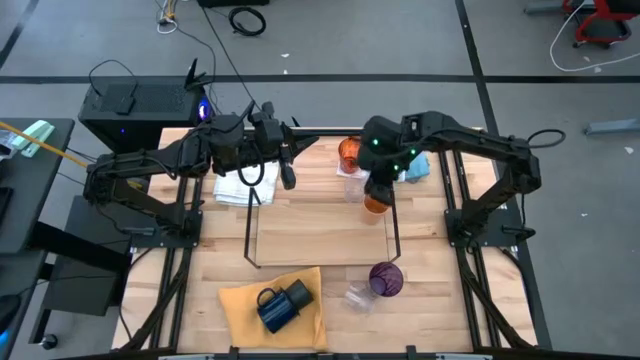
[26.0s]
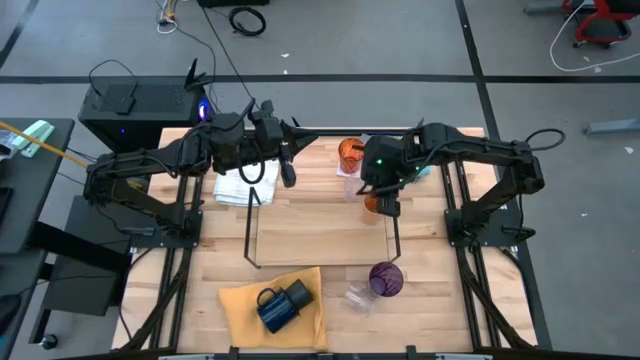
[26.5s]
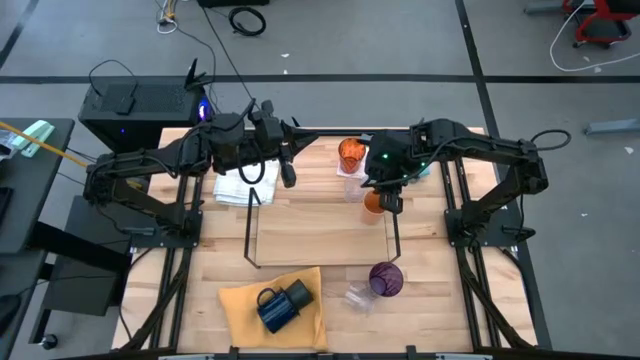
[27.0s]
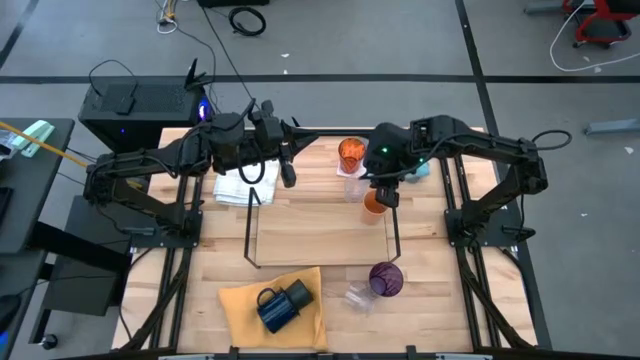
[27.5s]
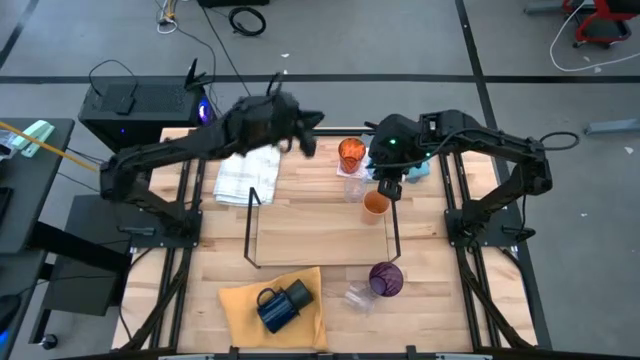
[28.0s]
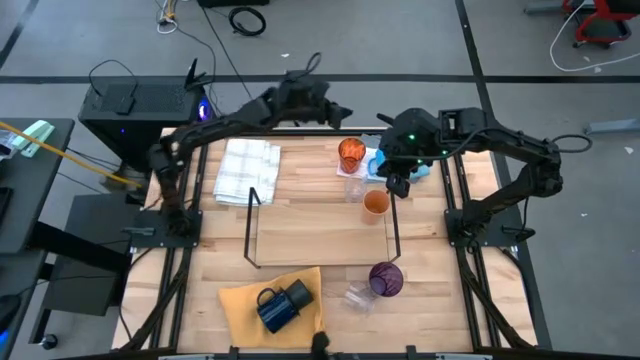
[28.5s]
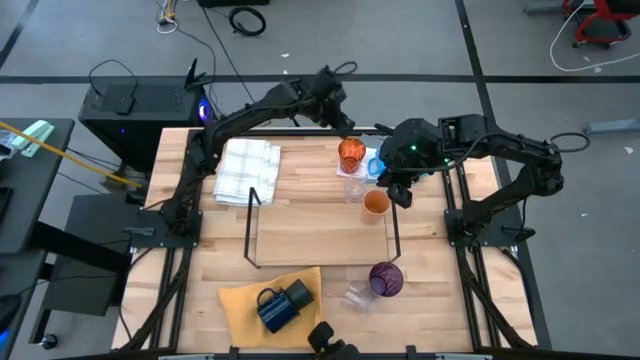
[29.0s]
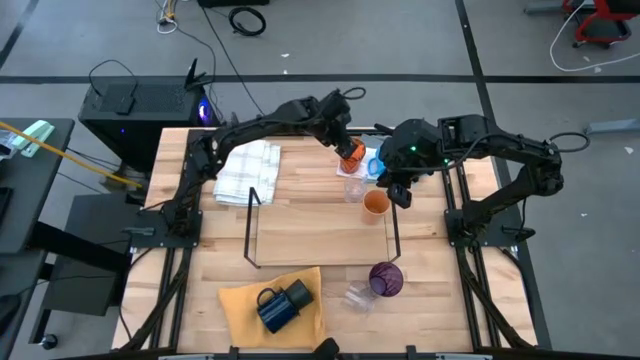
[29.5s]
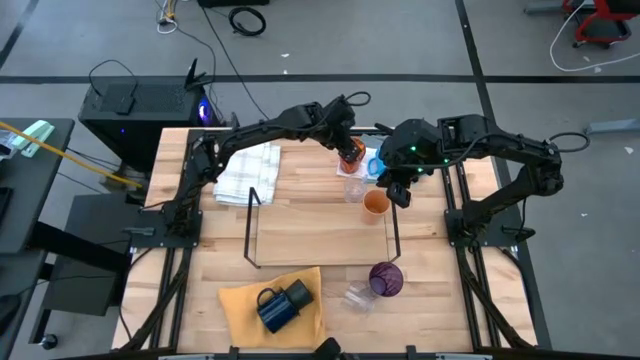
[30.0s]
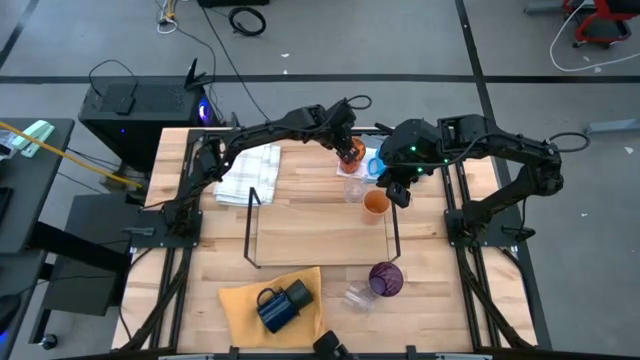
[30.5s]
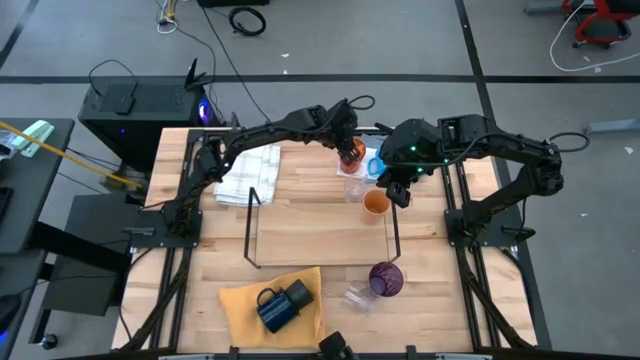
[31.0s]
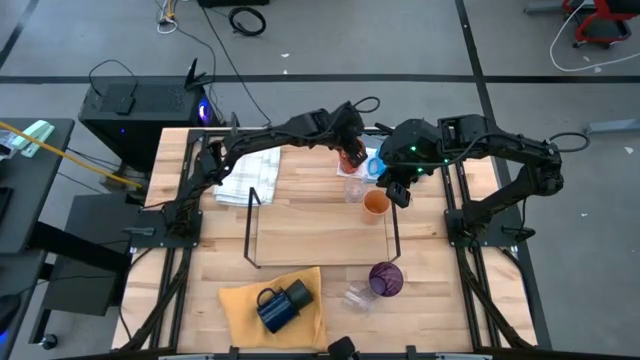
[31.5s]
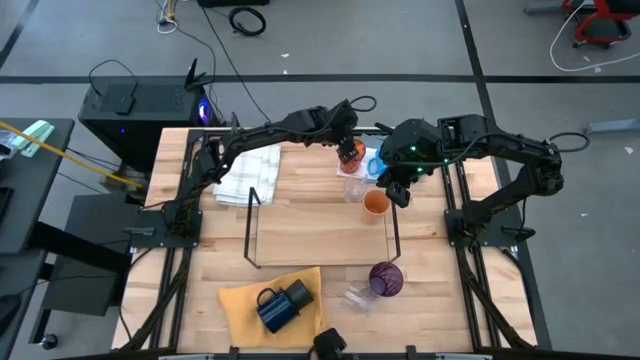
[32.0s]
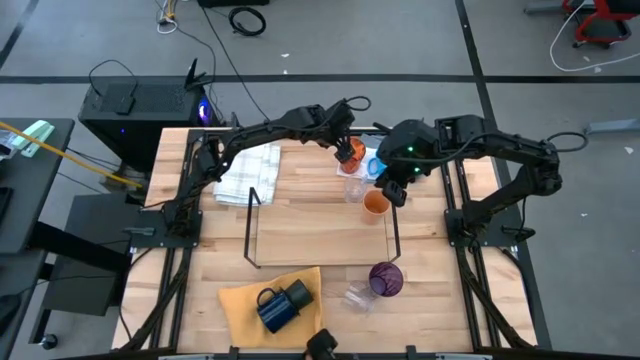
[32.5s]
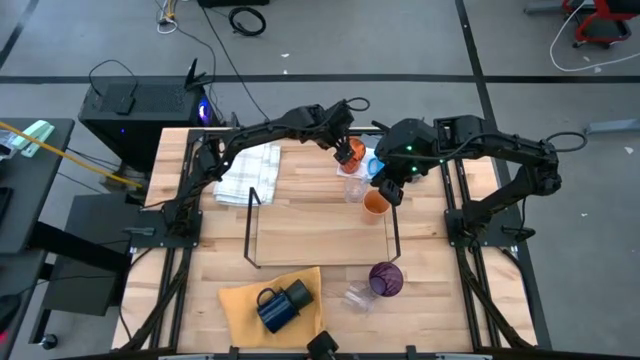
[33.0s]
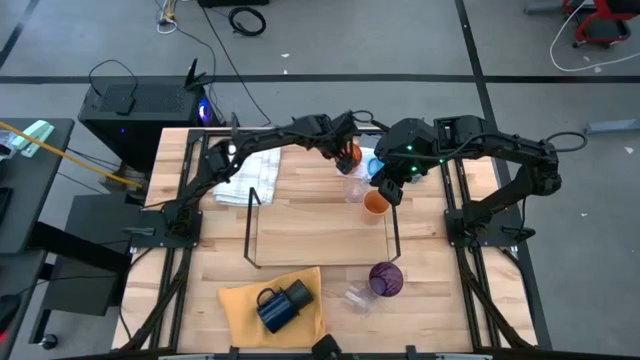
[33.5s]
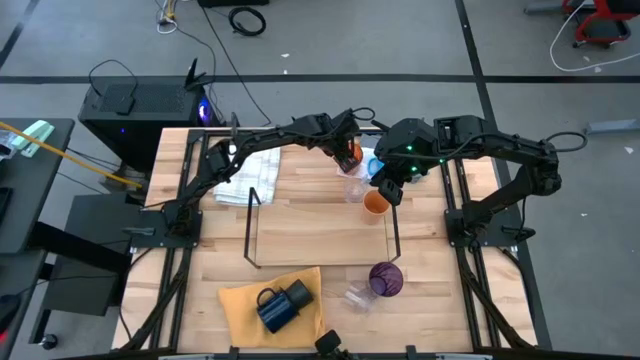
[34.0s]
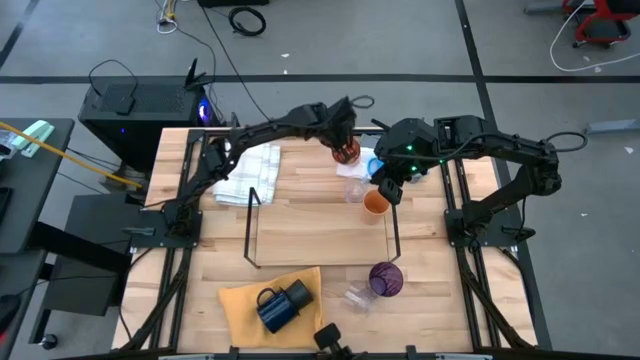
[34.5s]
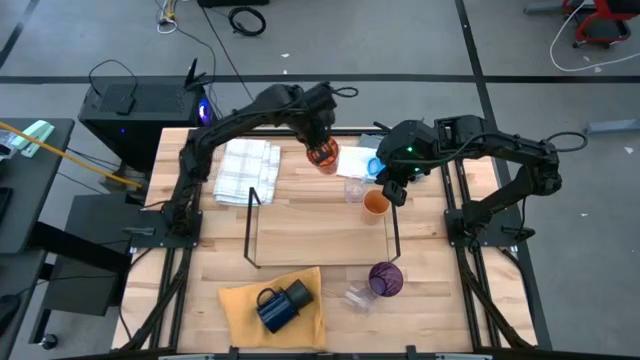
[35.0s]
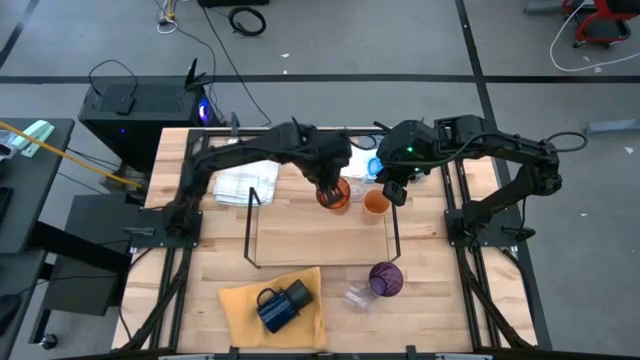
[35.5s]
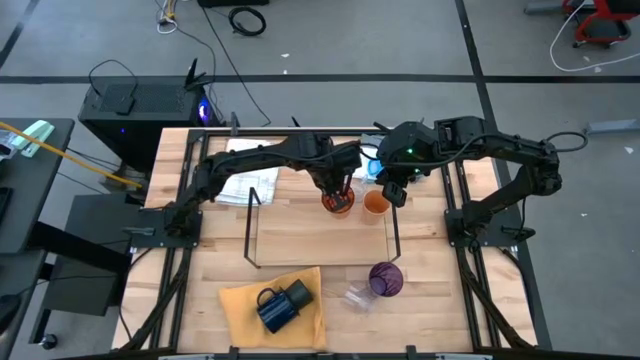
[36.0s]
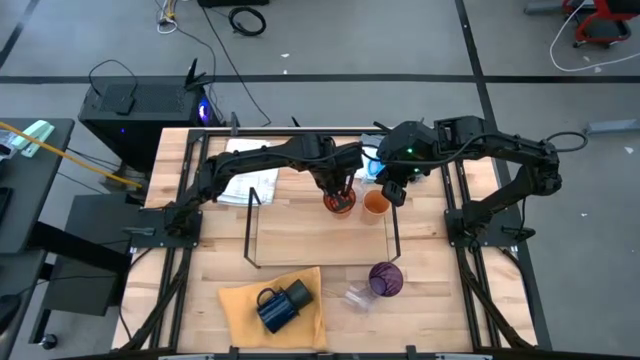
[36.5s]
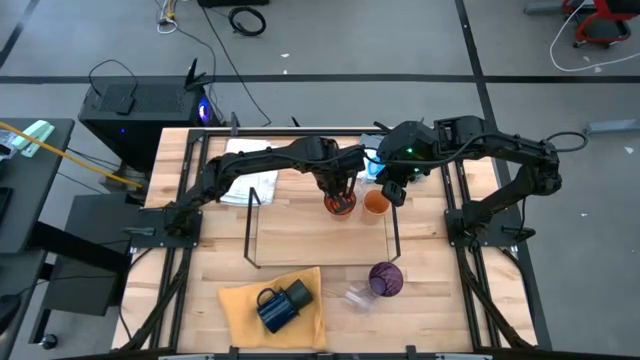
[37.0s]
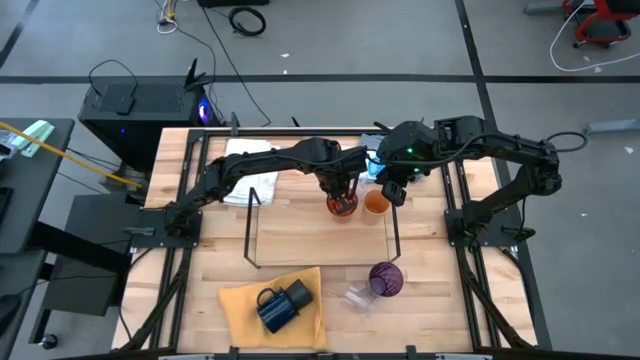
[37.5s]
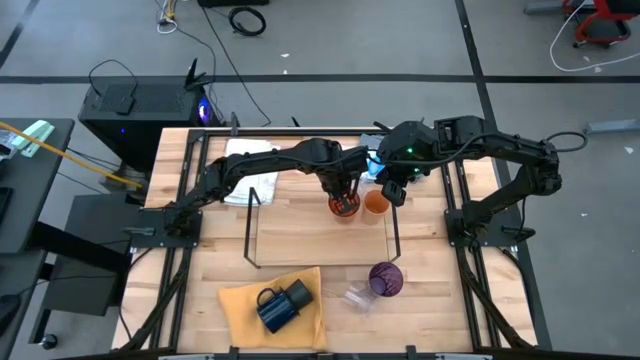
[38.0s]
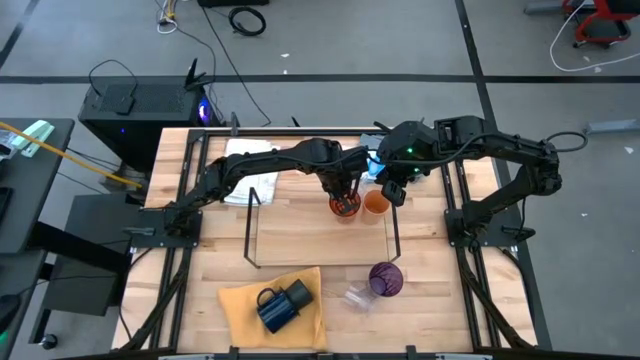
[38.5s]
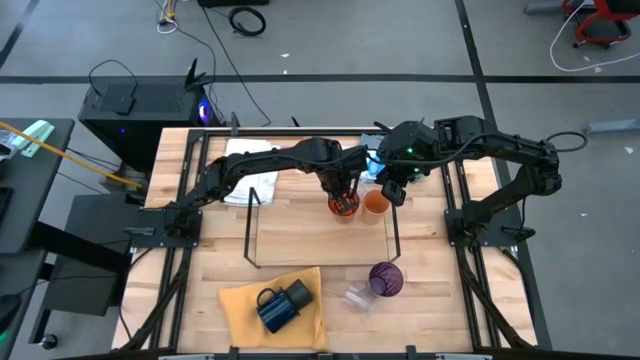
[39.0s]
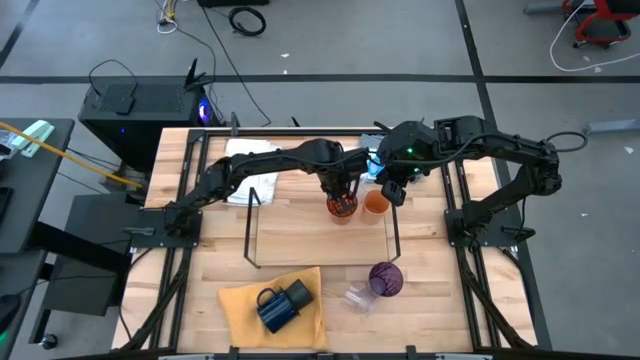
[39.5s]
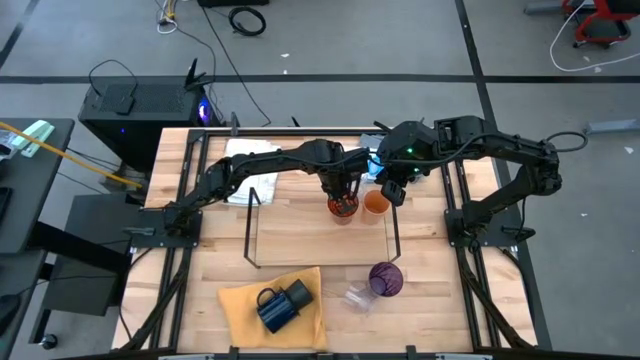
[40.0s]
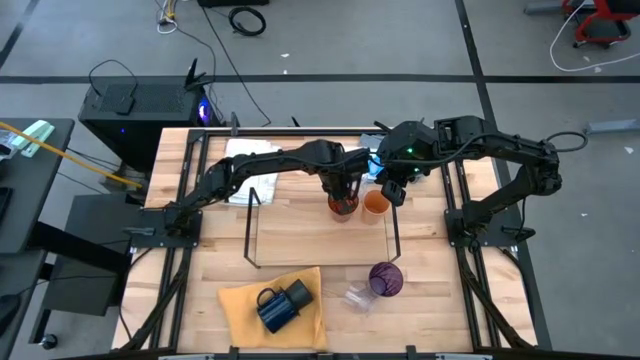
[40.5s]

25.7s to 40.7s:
Task: Stack small to large cups/mugs on shelf
Put the orange cup on the shelf

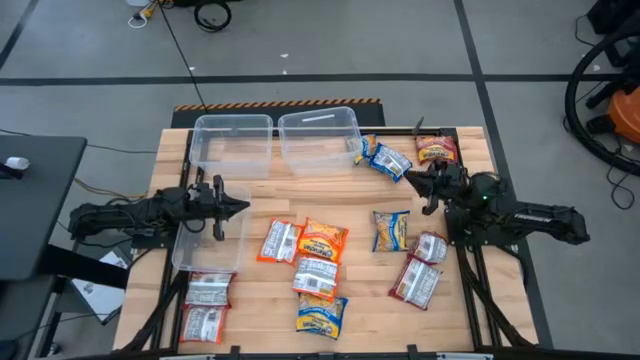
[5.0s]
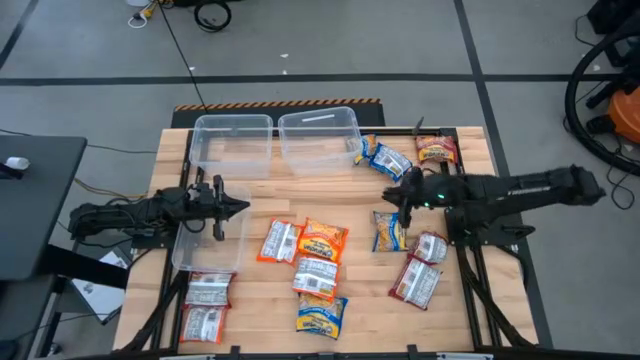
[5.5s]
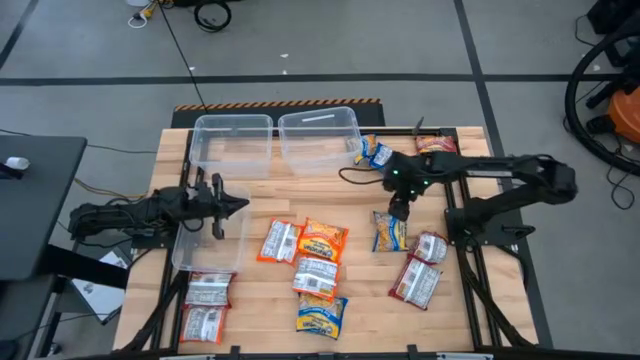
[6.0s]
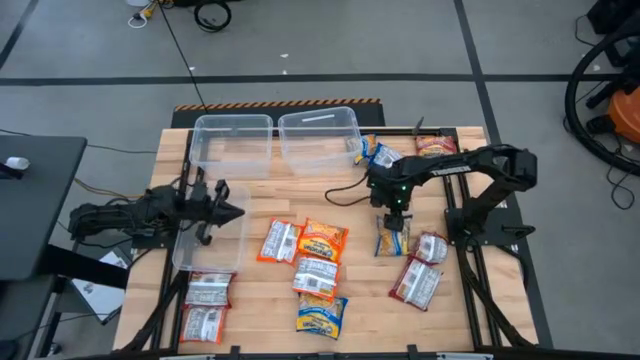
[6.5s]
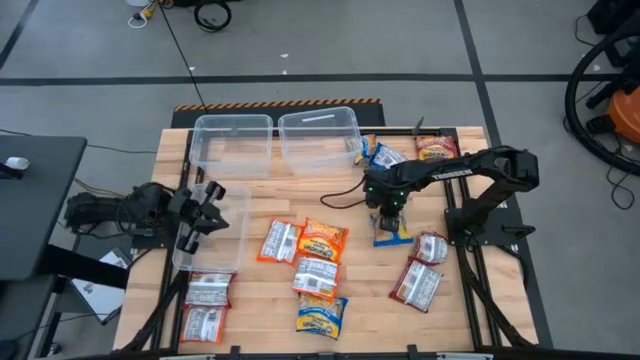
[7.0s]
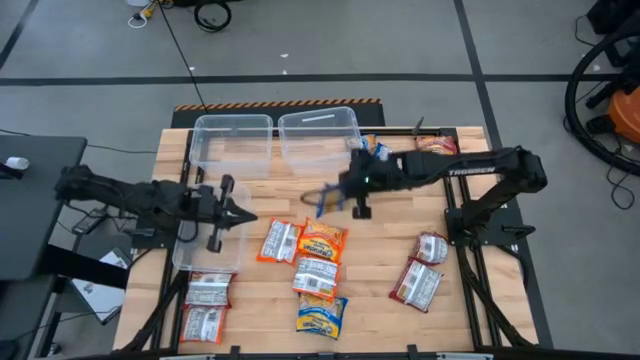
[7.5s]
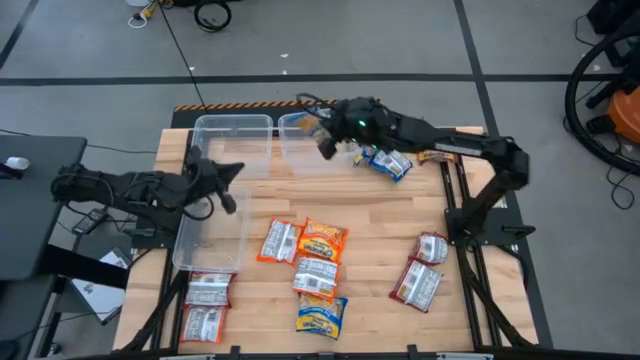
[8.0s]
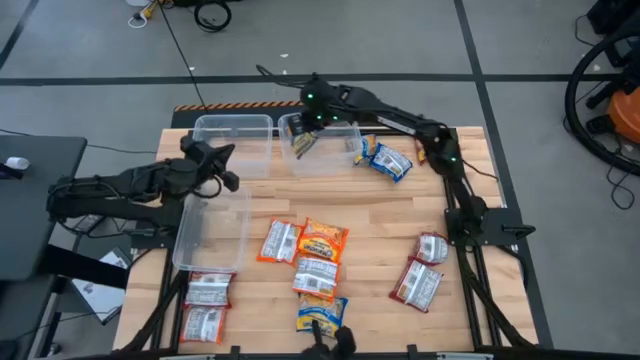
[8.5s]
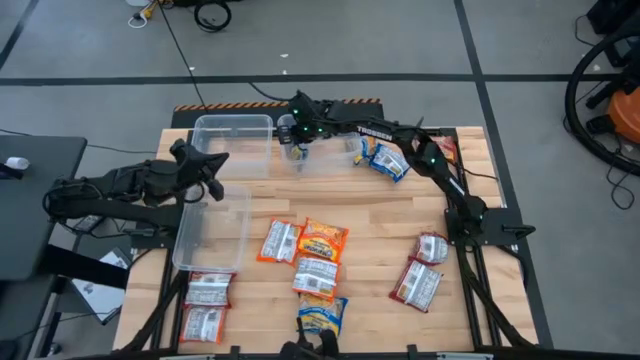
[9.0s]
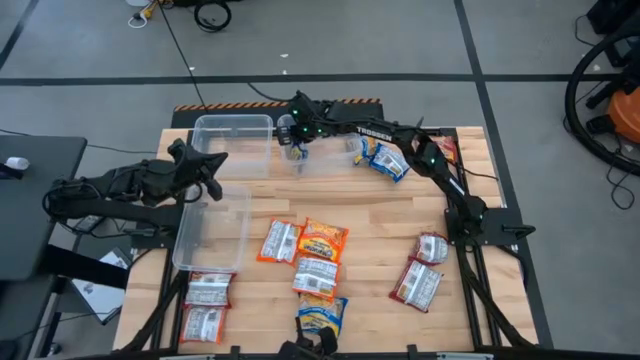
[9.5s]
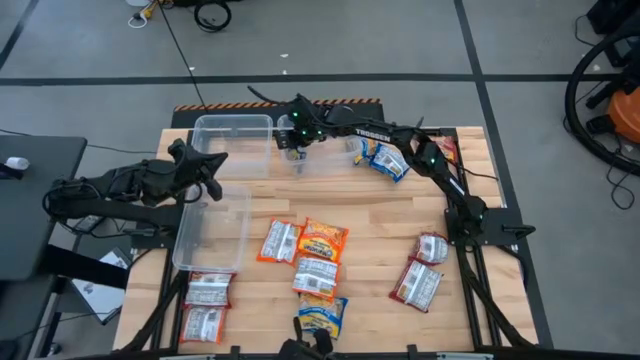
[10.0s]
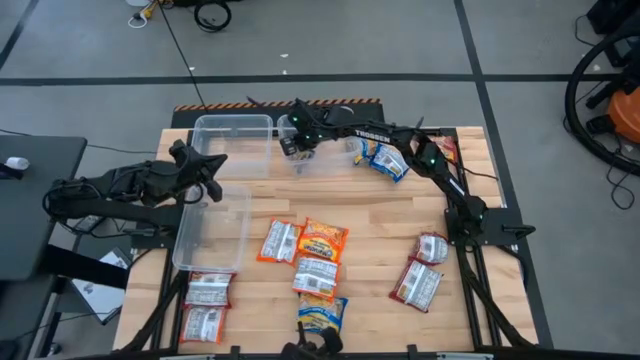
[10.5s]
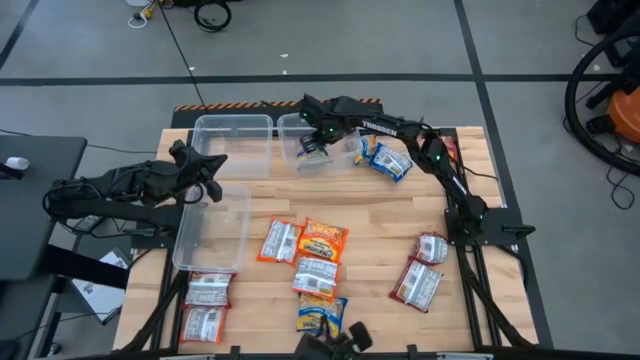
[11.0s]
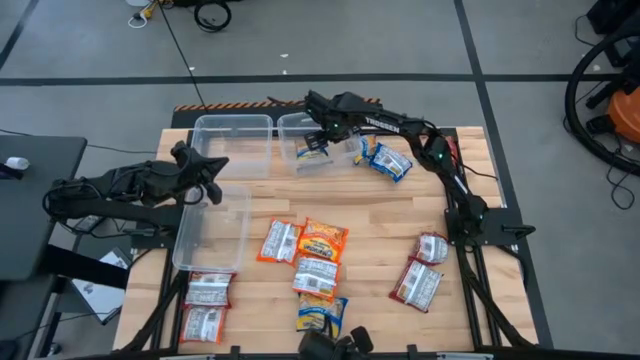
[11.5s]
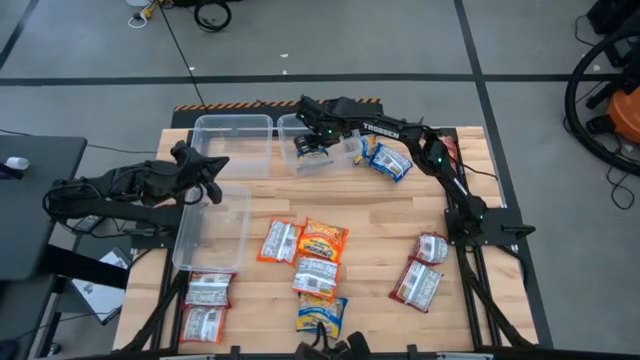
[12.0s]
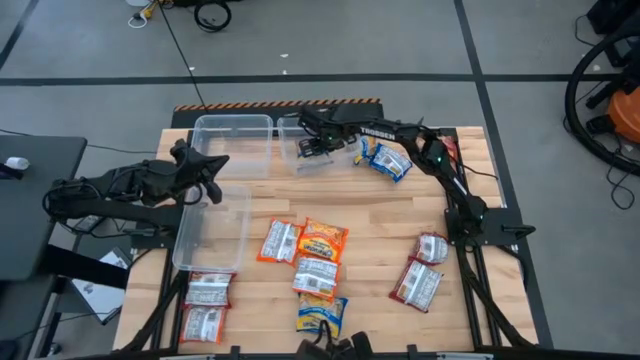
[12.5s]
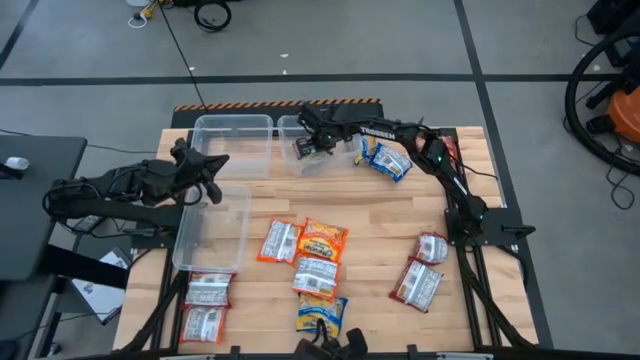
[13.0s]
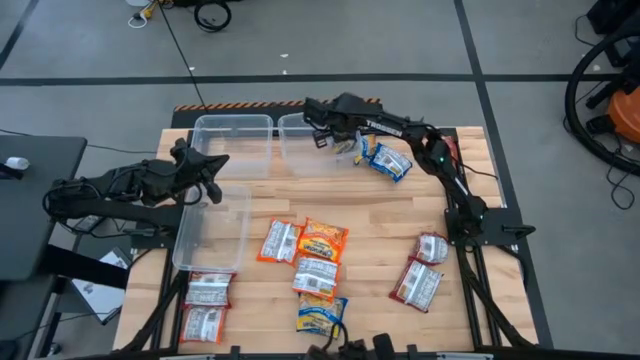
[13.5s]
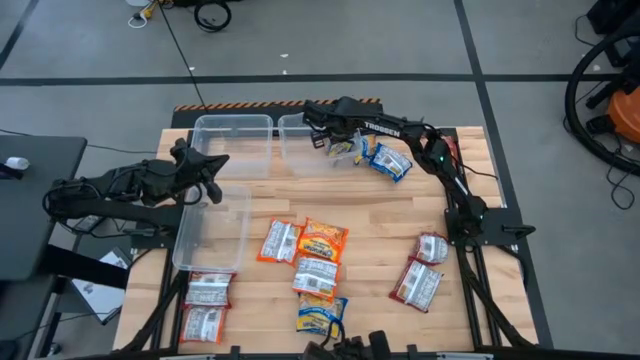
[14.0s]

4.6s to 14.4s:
Task: Sort Maruchan noodles
Put the middle right blue noodle pack into the top right transparent bin
